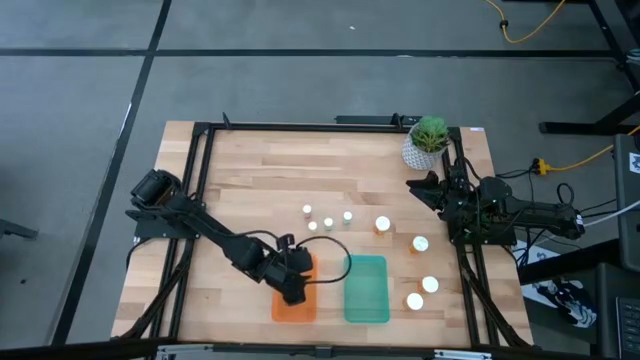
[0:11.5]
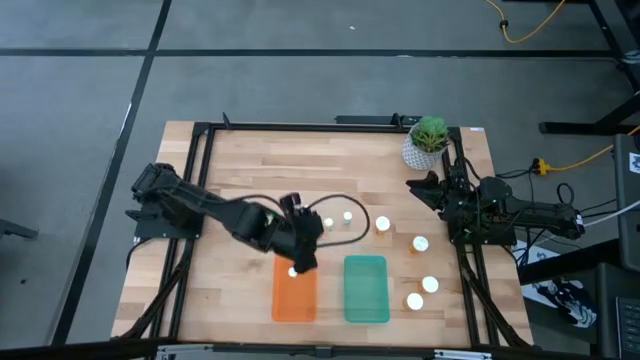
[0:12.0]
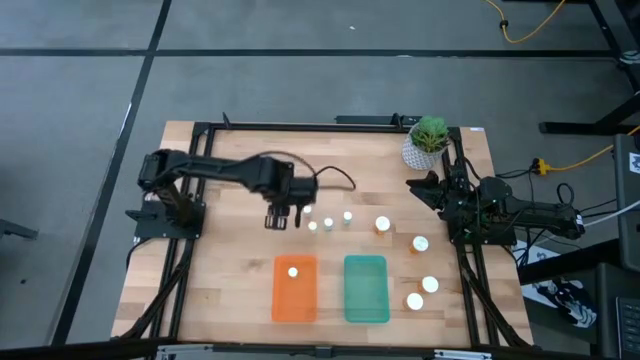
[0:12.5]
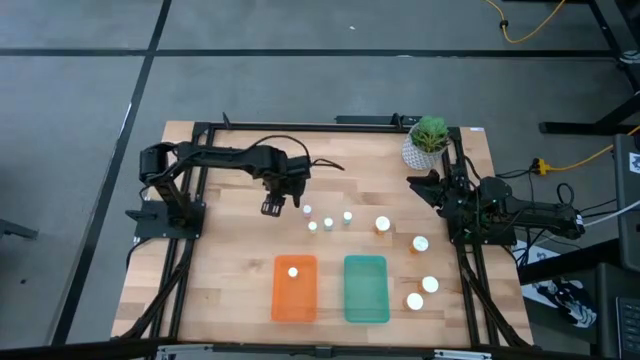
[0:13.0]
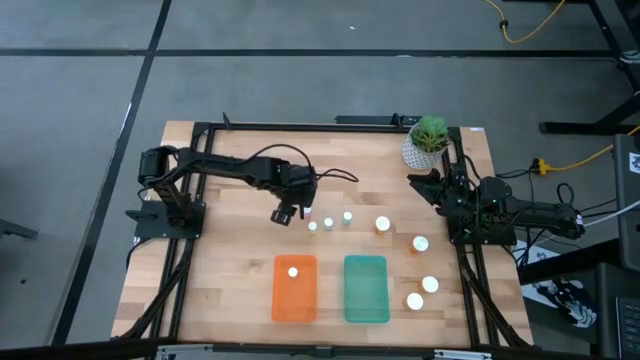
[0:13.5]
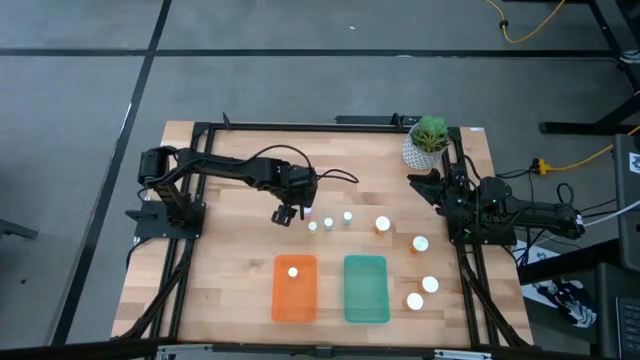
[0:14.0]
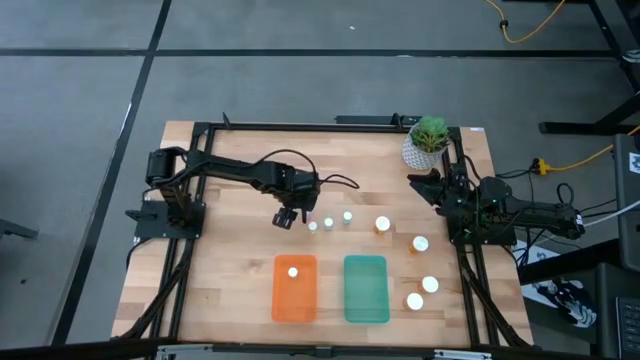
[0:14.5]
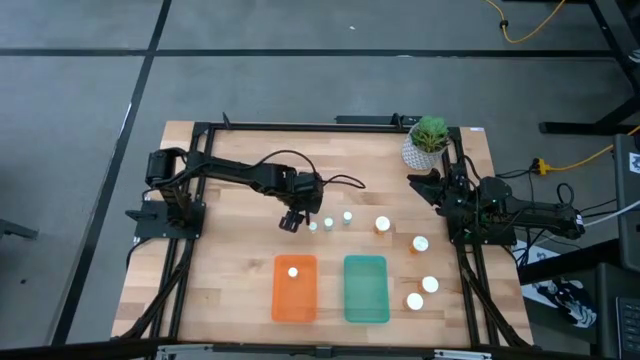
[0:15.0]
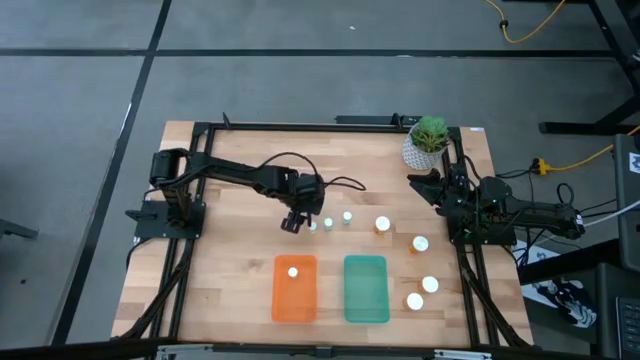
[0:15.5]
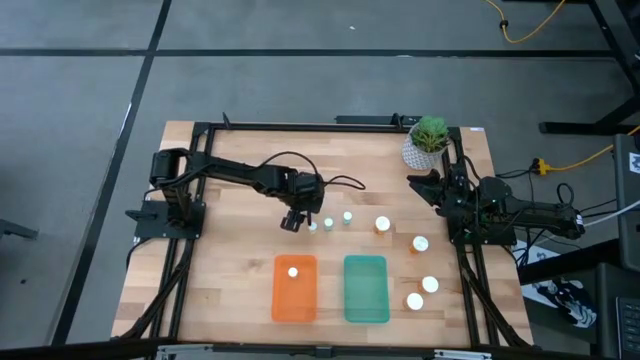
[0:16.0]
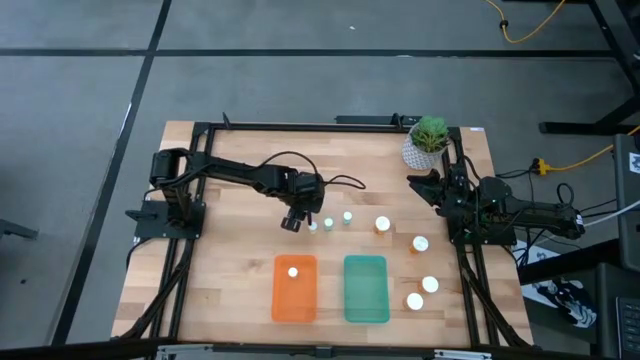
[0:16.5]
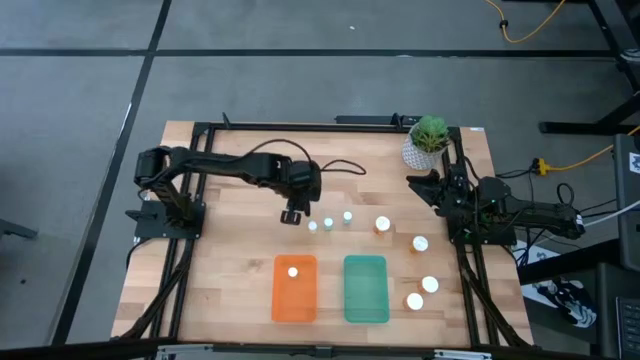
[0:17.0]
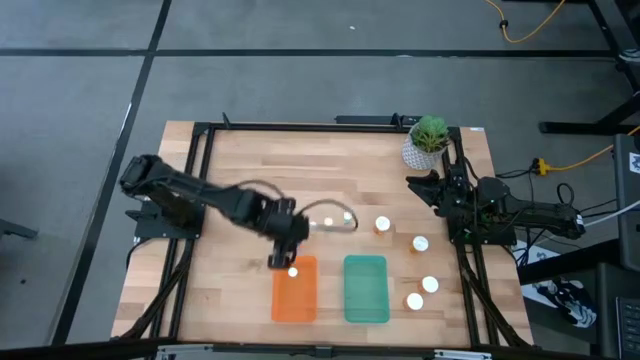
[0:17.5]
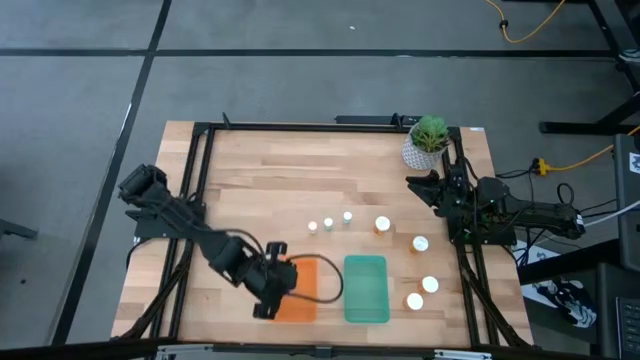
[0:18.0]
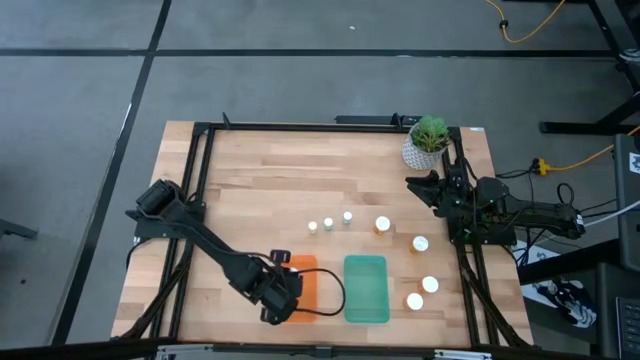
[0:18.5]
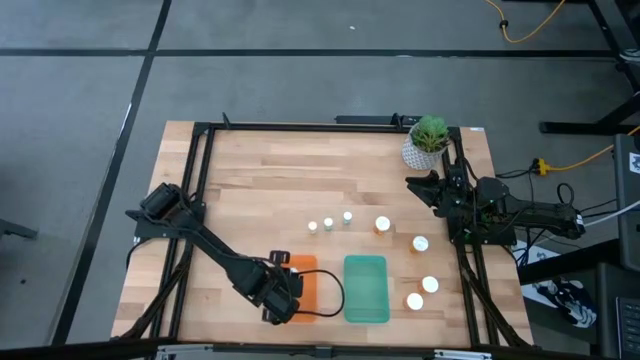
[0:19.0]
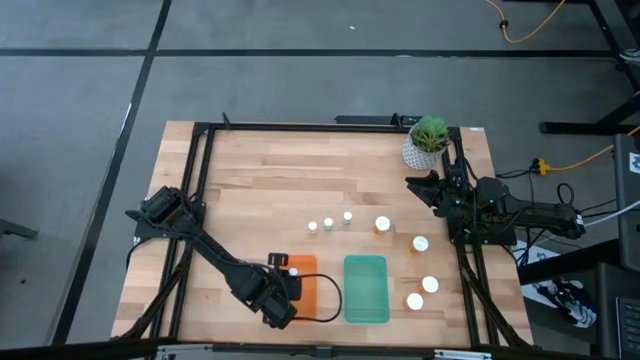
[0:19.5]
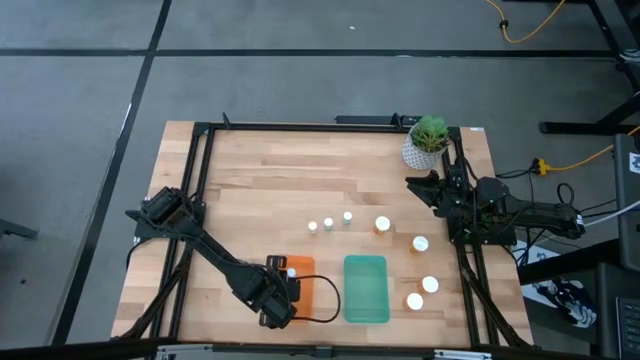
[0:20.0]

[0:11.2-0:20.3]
Task: Pick and place medicine bottles into bin by pill shape (circle, oval)
Put the small pink pill bottle into the orange bin

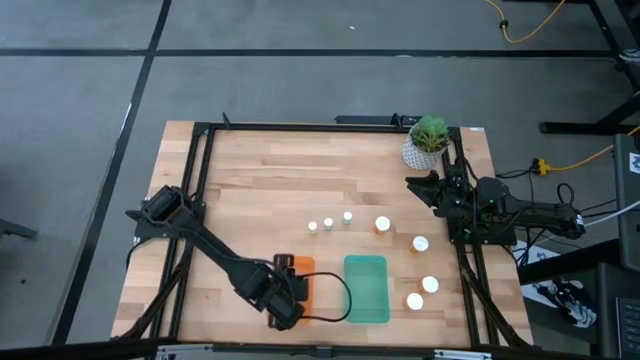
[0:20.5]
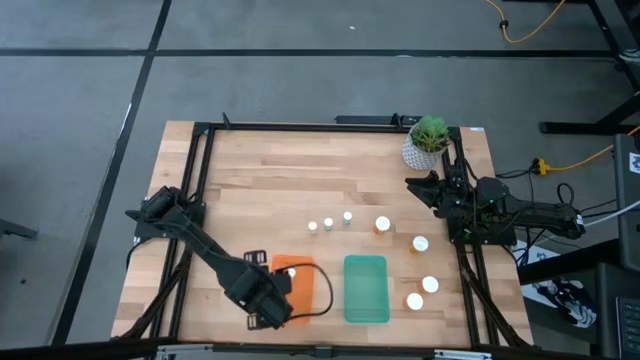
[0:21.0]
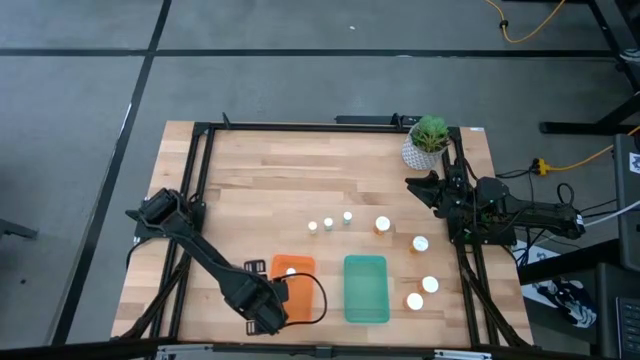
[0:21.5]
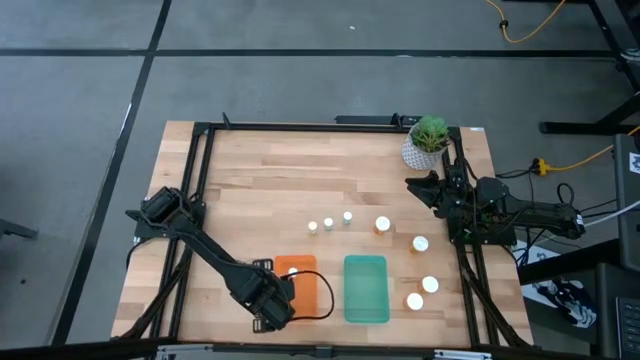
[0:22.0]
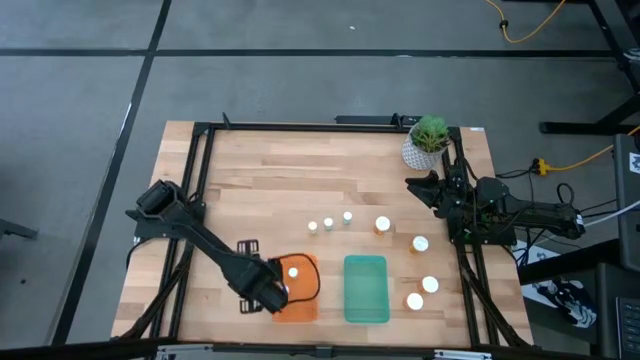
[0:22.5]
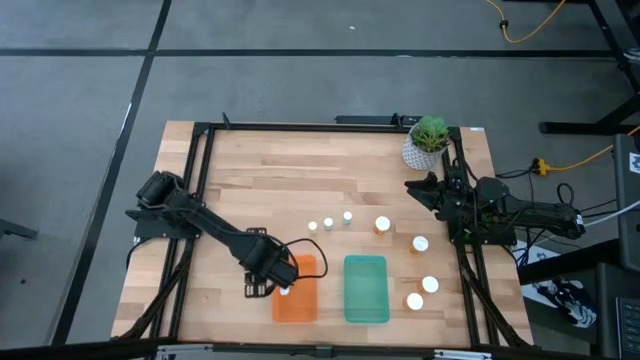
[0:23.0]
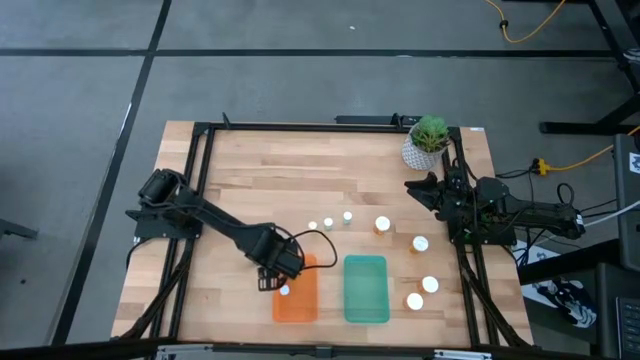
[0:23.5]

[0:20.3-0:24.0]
Adjust the orange bin on the table

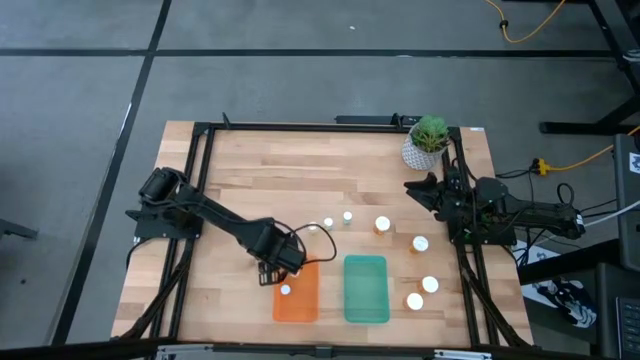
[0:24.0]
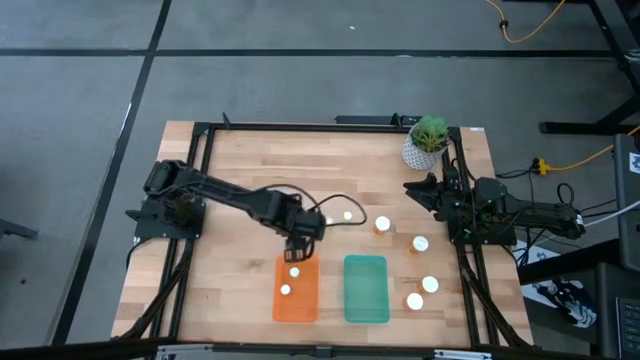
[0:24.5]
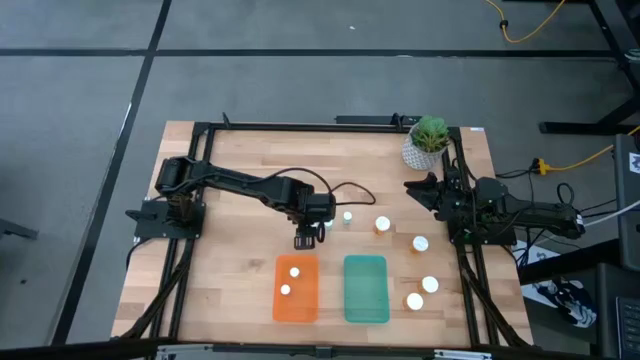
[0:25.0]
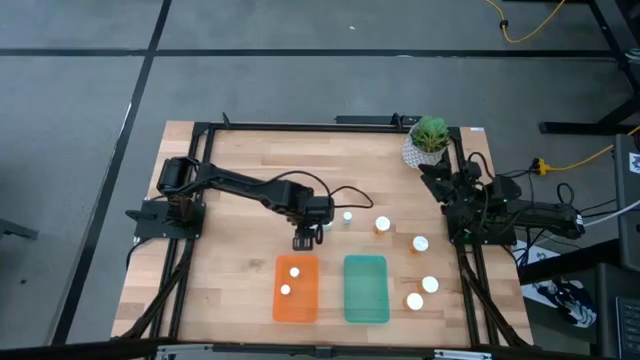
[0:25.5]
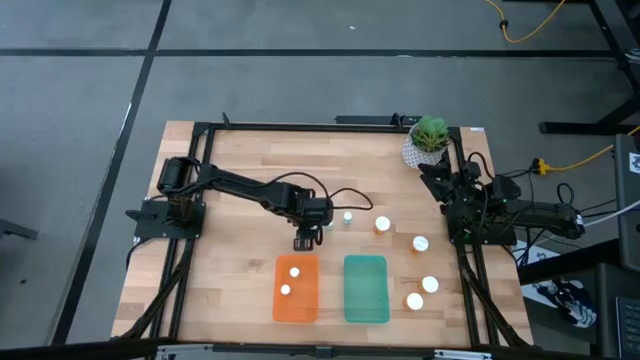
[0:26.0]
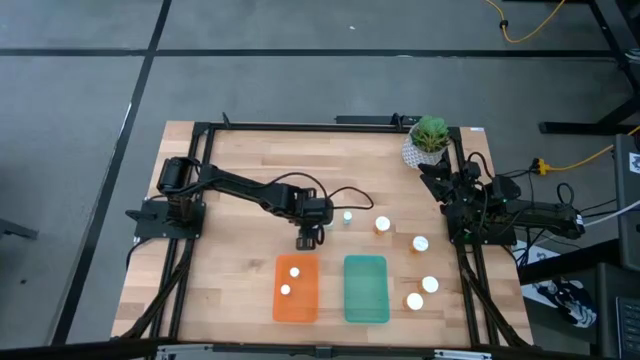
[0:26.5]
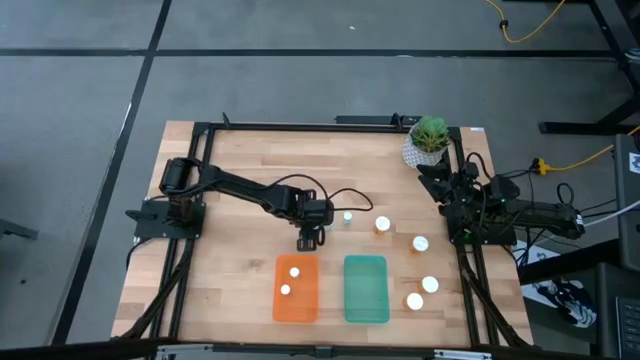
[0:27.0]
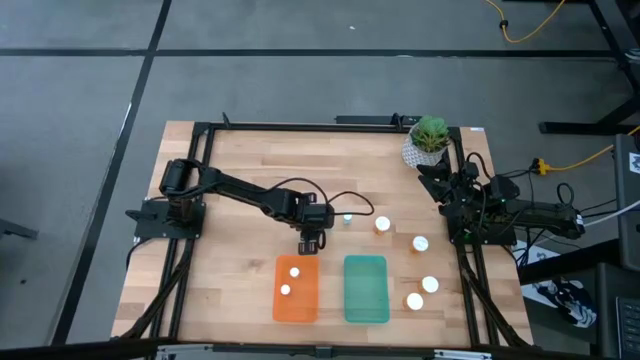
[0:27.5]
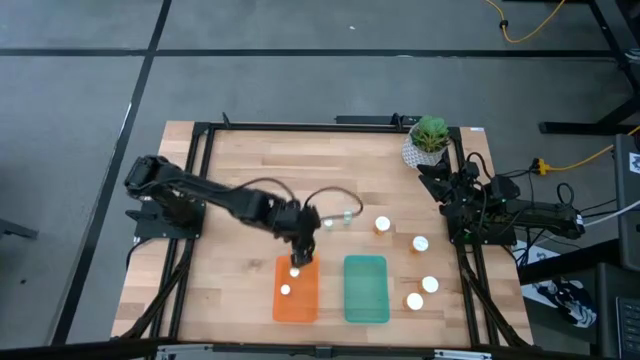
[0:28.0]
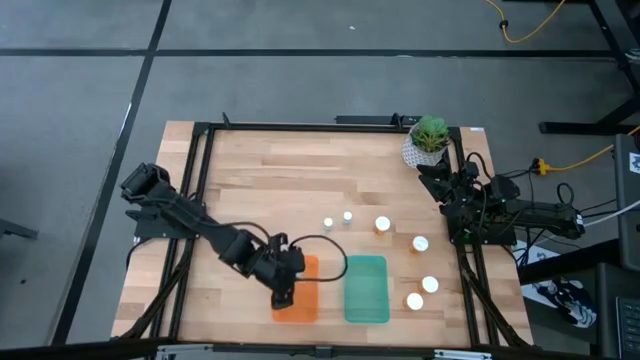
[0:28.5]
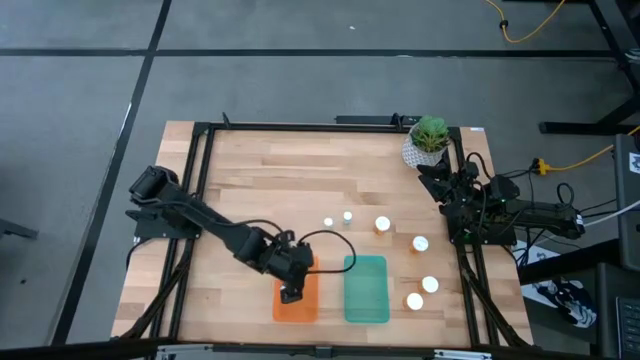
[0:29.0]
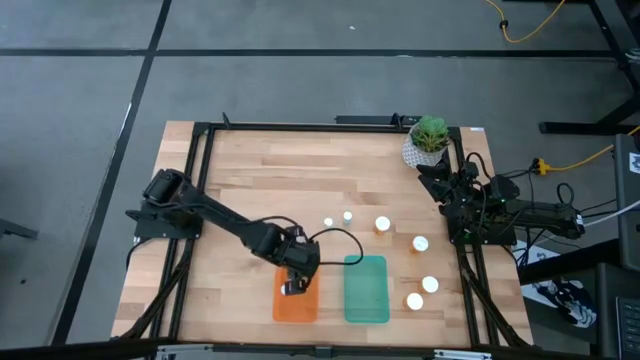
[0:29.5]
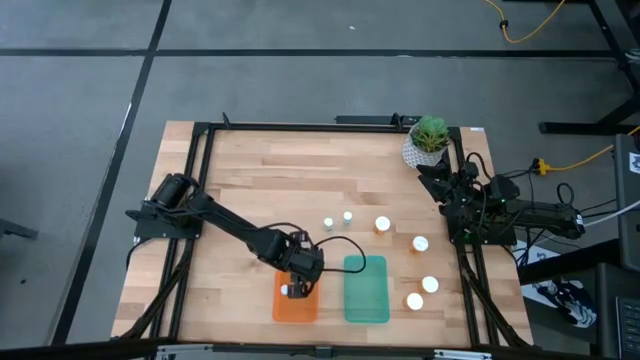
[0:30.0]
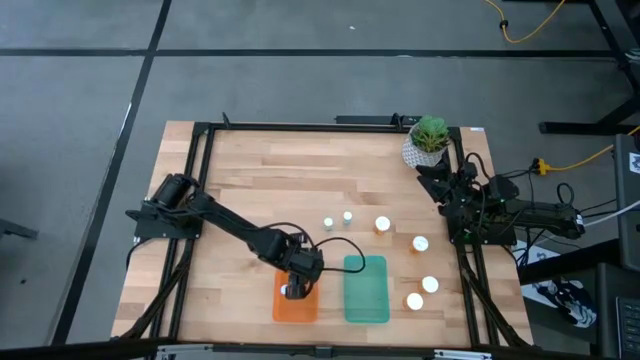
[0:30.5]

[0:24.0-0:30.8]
Put the small yellow pill bottle into the orange bin

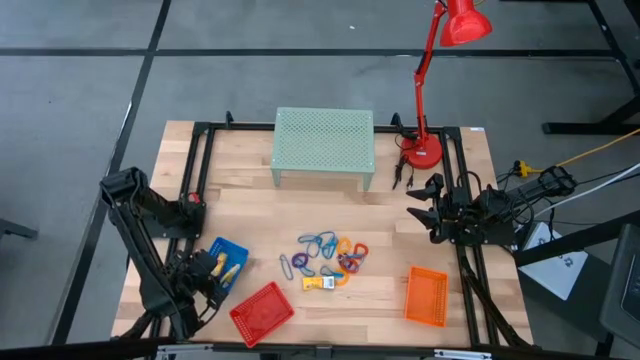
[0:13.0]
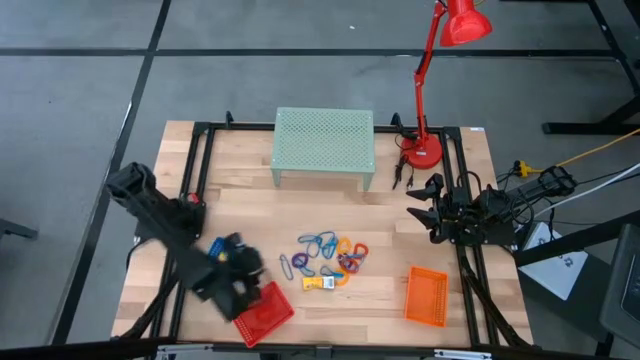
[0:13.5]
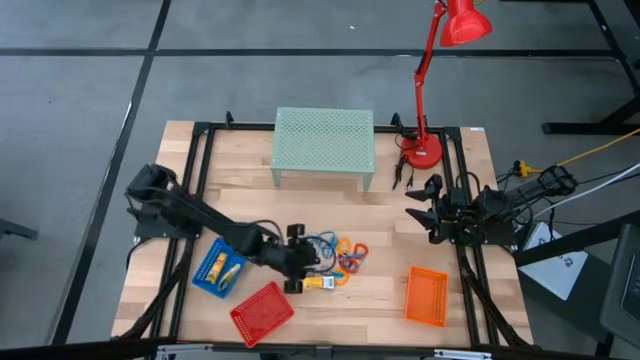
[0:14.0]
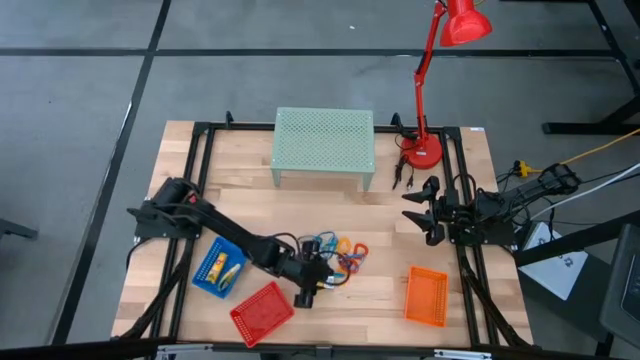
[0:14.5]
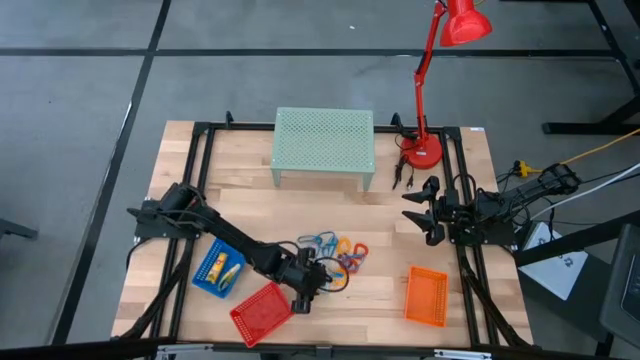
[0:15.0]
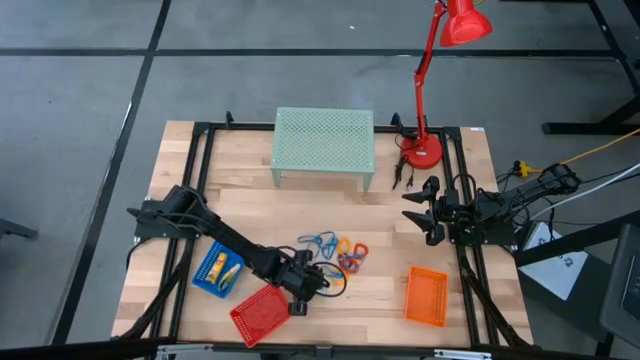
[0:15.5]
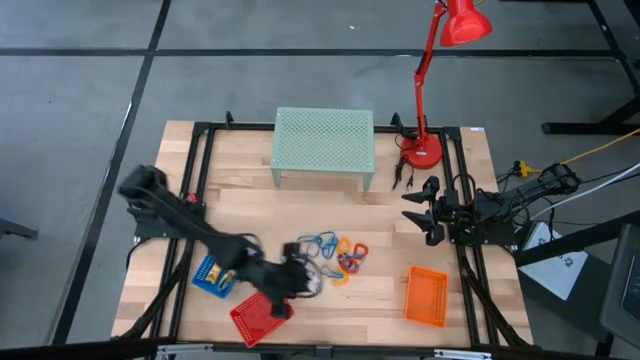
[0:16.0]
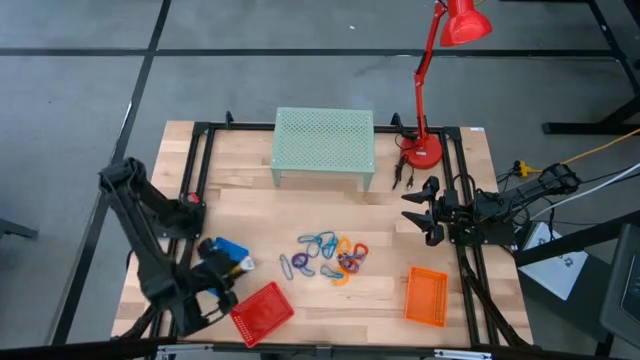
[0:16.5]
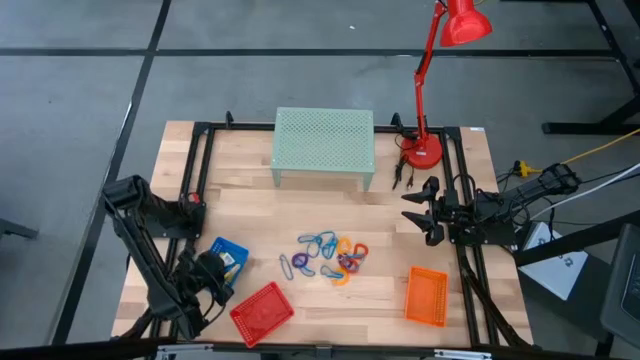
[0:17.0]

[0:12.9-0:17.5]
Task: Pick & Place Office Desk Supplies
Put the yellow crayon pack into the blue bin
